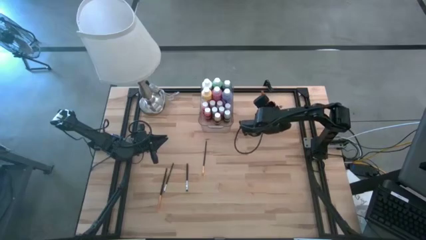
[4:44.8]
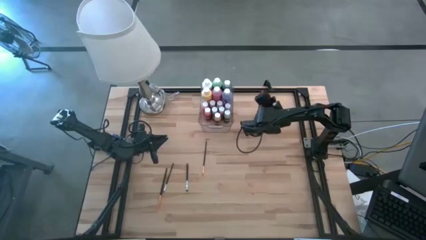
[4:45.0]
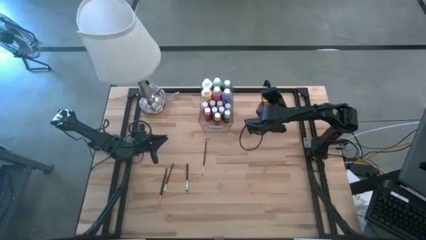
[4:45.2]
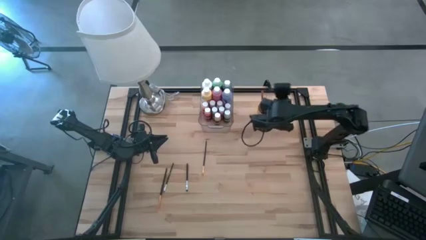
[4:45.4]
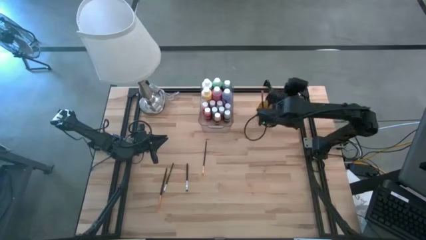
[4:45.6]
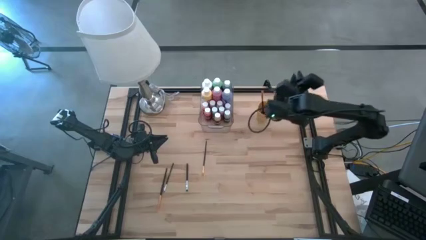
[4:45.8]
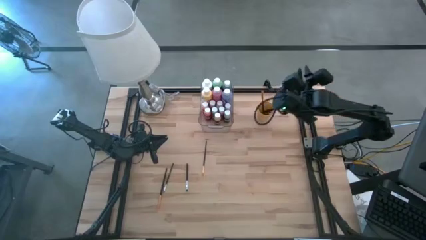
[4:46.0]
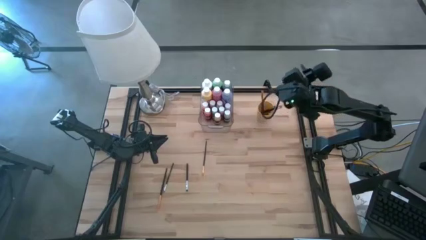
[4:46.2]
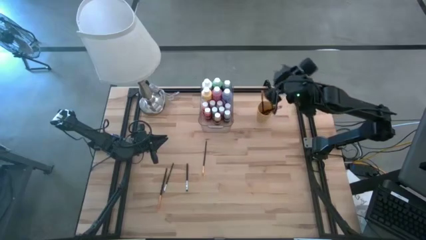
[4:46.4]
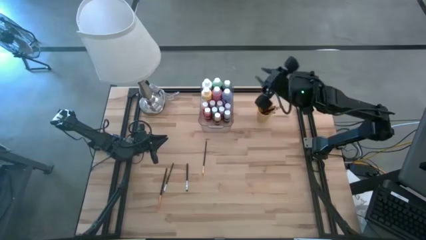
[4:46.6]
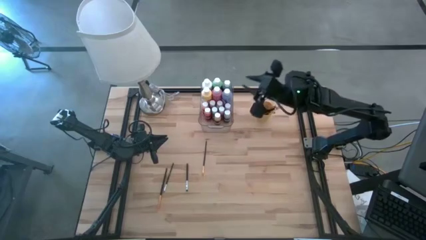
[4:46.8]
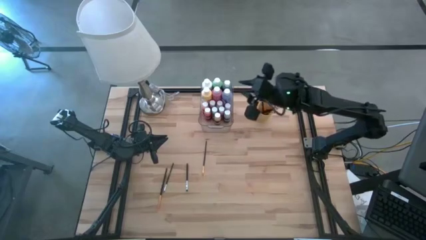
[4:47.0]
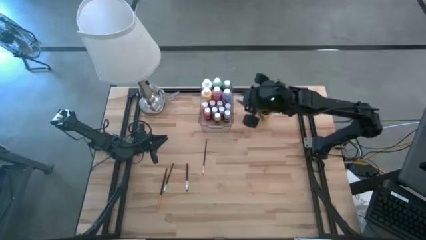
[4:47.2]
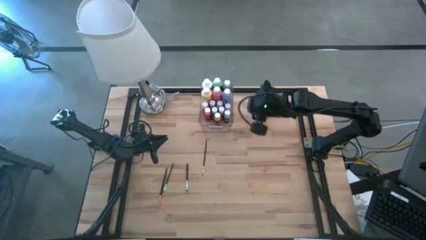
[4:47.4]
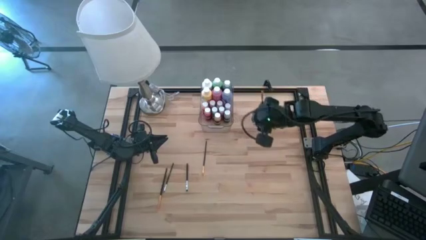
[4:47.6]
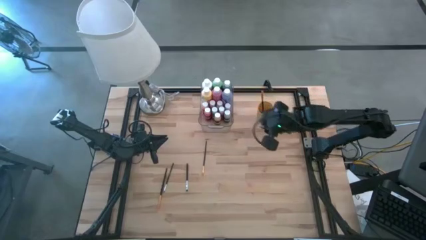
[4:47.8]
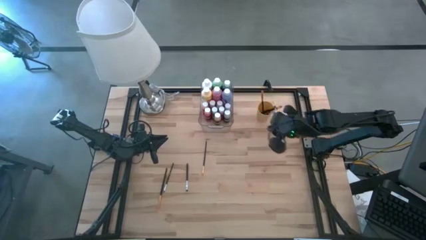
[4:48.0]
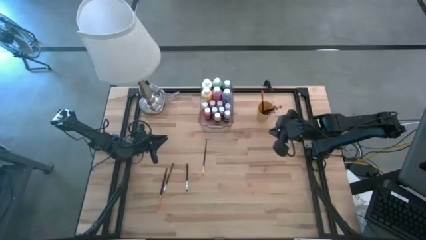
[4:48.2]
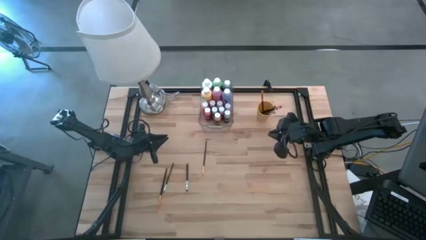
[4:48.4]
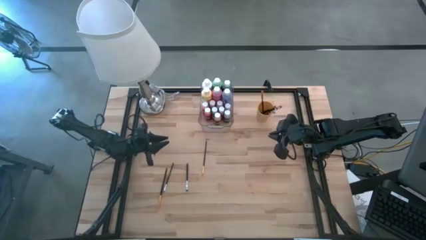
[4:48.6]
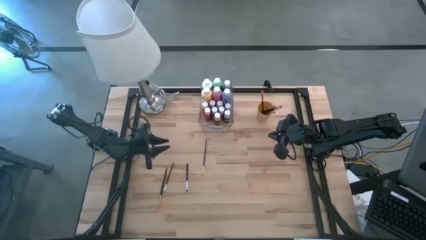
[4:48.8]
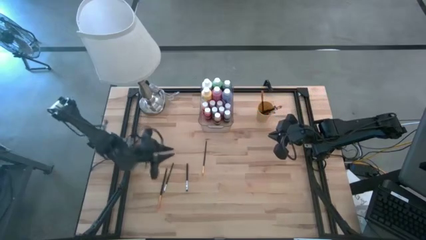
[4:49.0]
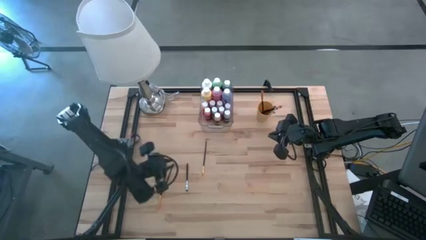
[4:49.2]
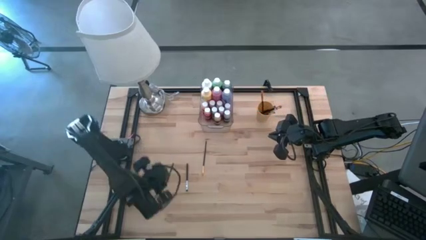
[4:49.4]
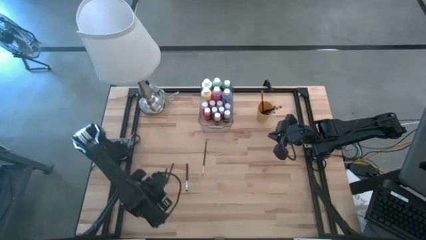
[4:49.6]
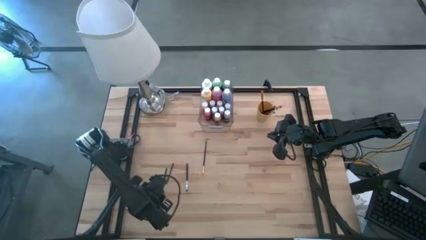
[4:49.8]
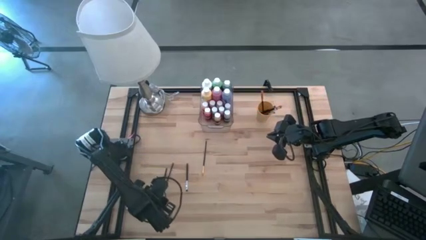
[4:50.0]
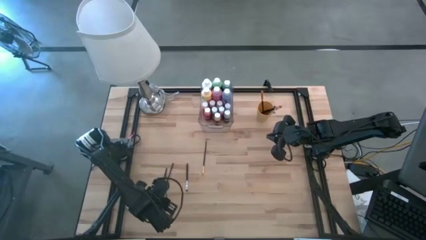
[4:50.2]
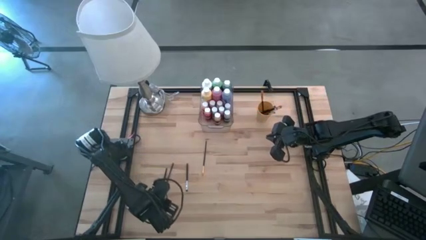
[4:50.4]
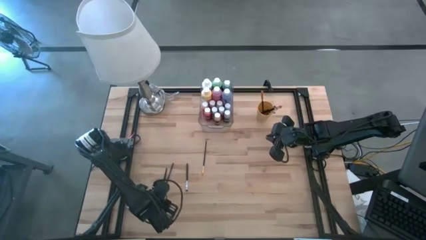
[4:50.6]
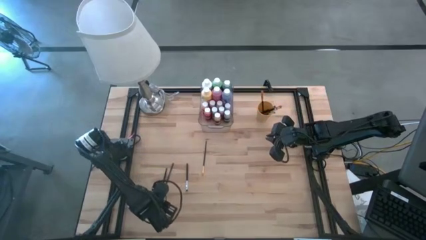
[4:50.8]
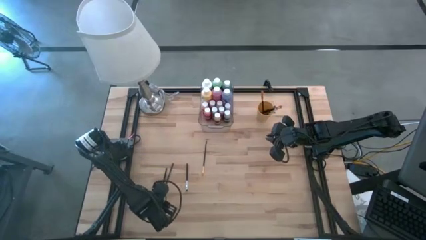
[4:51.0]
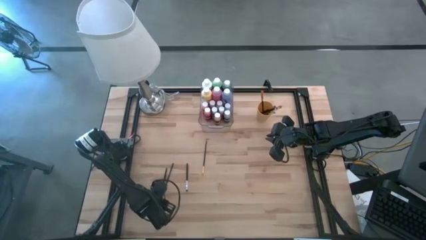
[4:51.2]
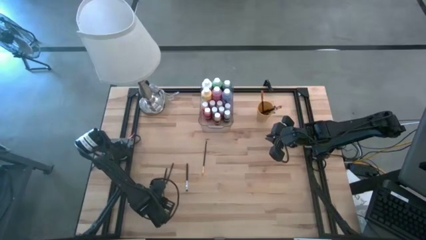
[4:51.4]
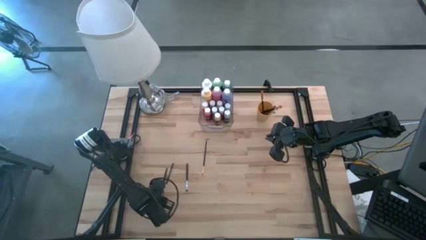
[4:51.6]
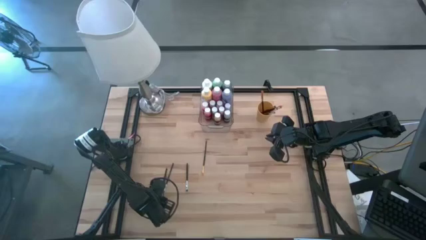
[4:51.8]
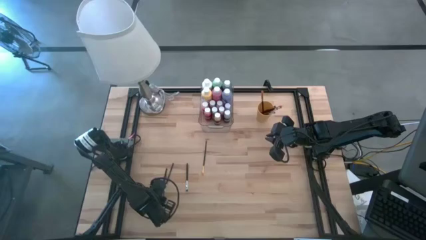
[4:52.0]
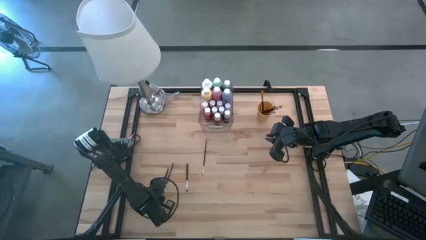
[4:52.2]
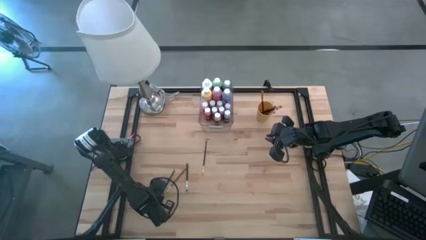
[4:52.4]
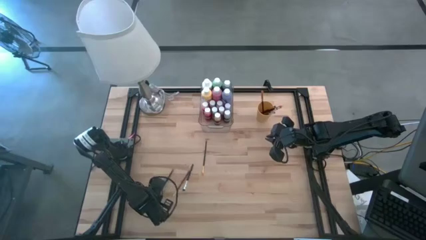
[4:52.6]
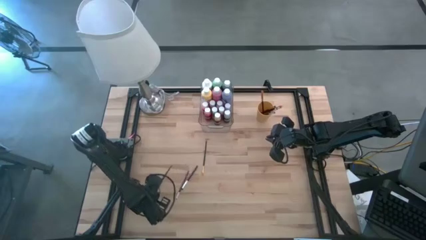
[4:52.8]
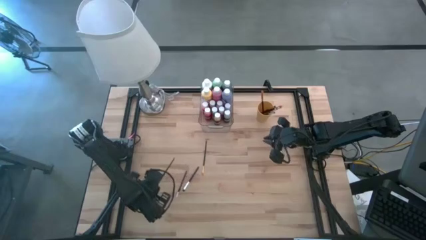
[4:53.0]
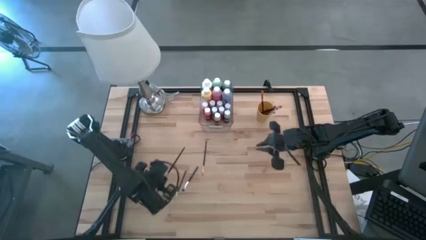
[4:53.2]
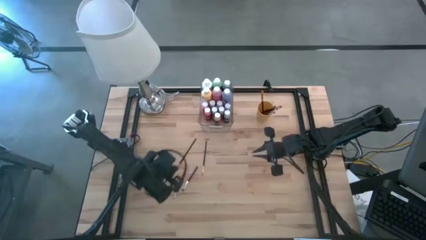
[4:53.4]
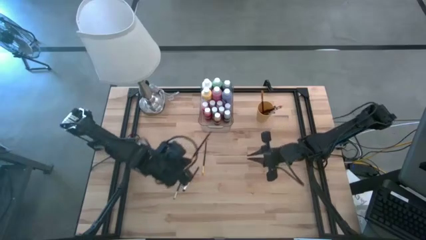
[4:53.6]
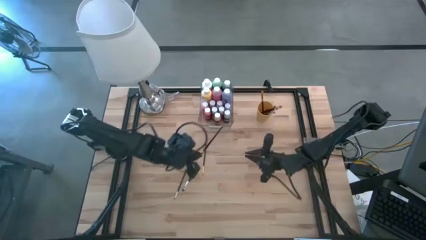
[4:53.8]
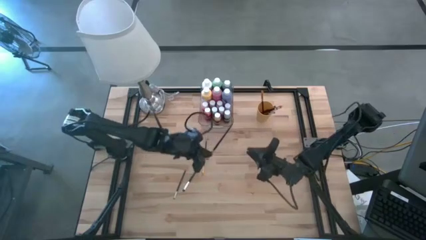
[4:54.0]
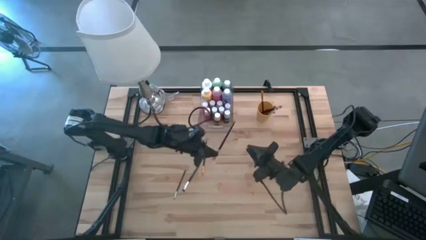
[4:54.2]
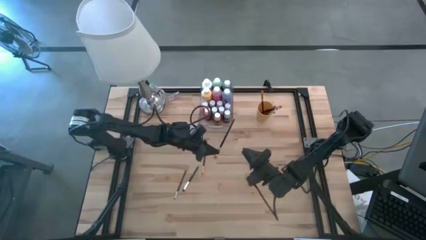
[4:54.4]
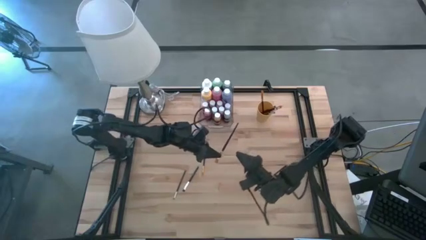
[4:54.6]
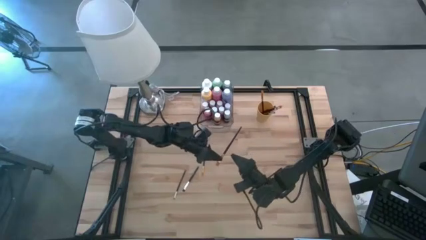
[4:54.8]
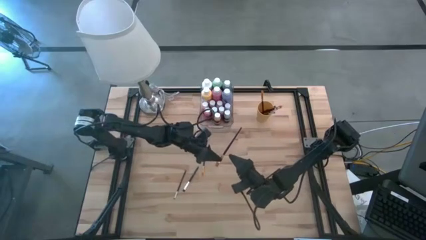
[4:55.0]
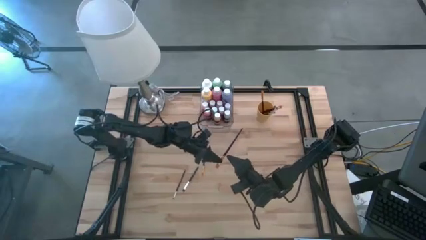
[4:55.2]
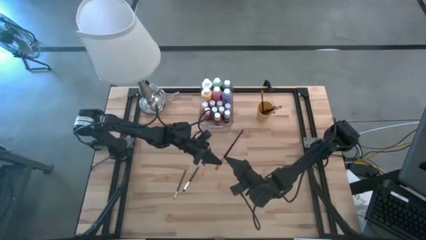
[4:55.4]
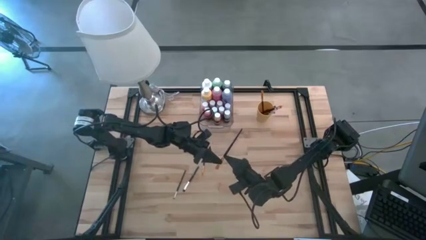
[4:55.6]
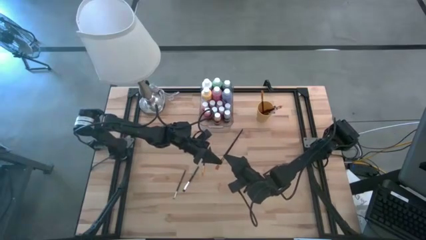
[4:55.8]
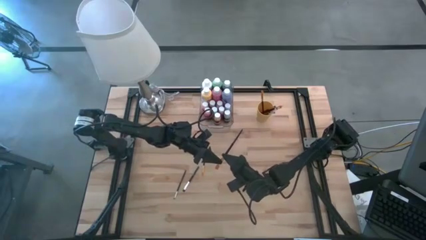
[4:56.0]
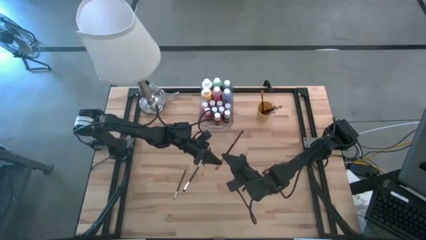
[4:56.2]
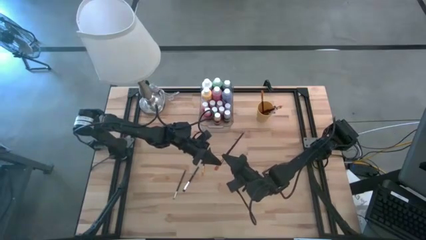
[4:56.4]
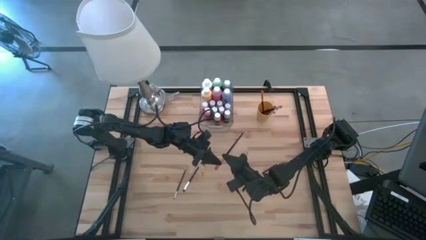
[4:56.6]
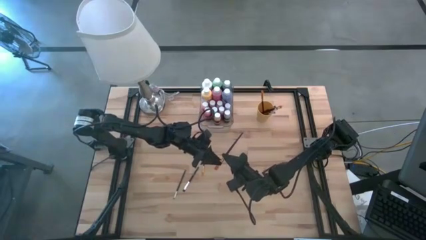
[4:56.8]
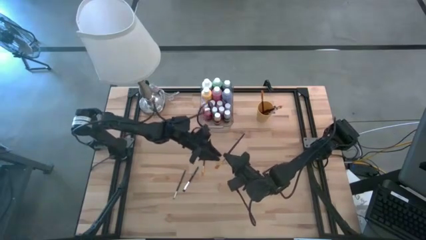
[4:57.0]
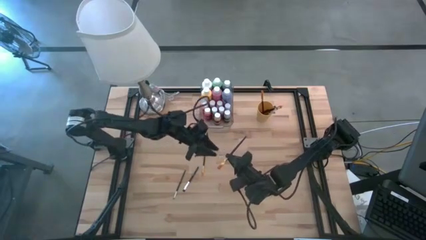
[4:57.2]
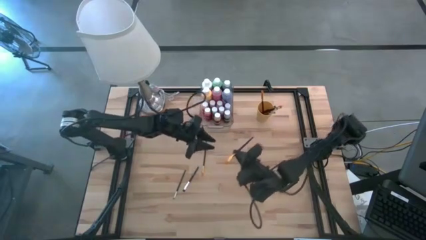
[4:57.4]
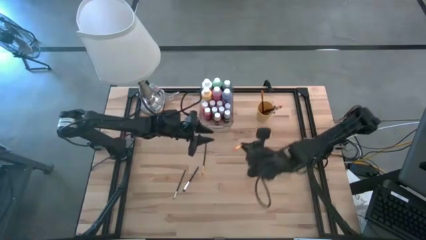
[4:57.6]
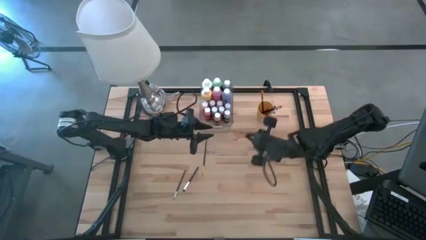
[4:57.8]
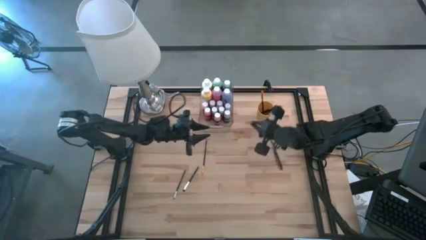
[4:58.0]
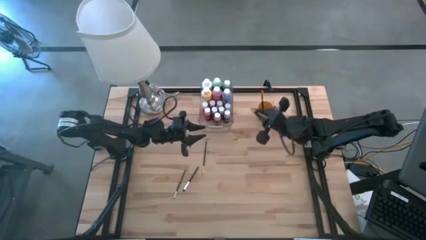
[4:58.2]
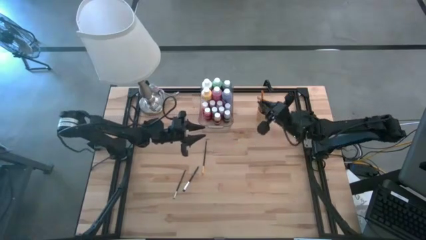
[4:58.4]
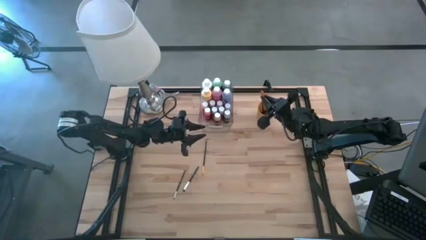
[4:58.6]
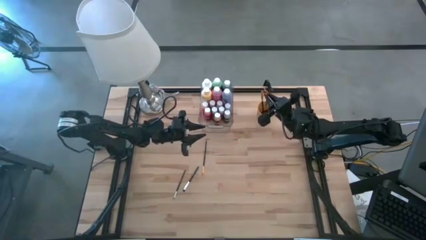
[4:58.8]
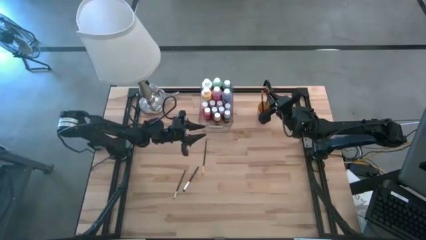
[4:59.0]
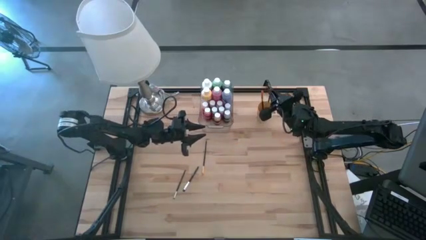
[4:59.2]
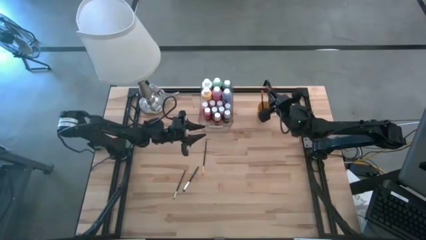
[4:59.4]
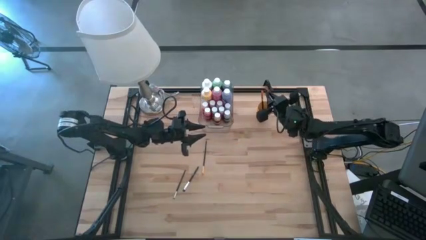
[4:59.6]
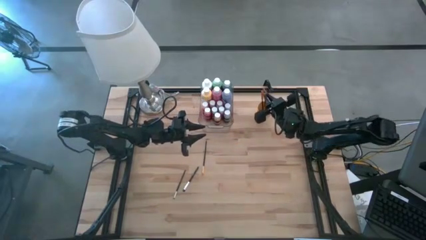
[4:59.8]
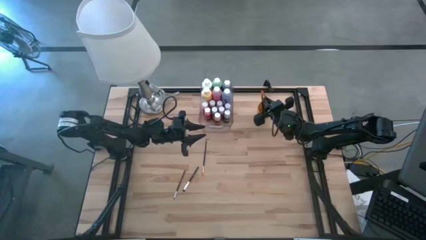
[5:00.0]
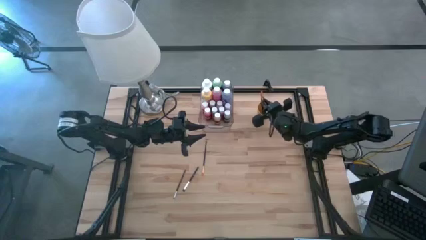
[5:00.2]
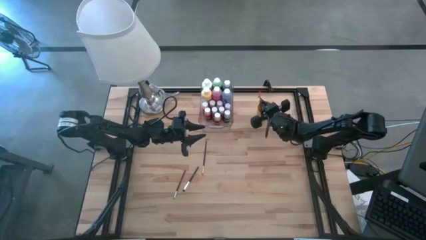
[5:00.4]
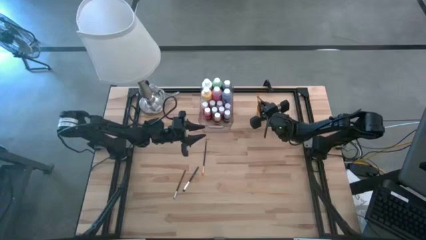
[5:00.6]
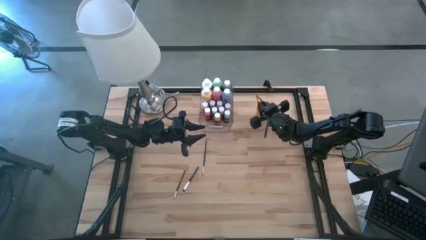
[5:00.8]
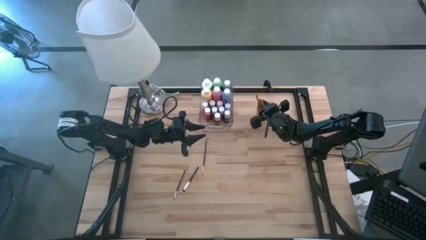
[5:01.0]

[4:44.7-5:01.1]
Task: Pick & Place Paint Supplies
Put the gold paint brush into the cup
